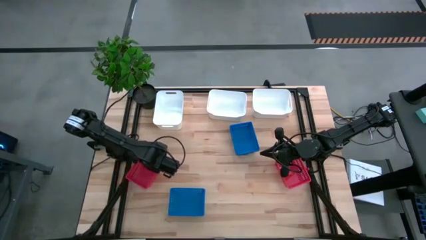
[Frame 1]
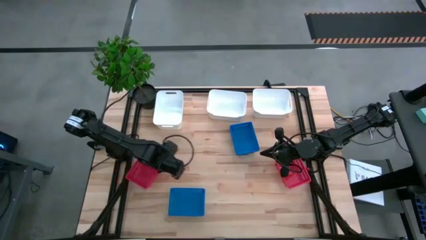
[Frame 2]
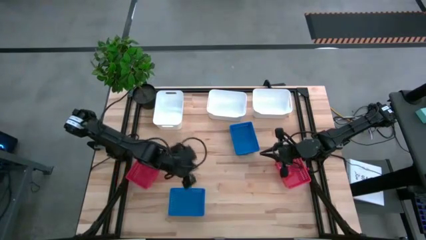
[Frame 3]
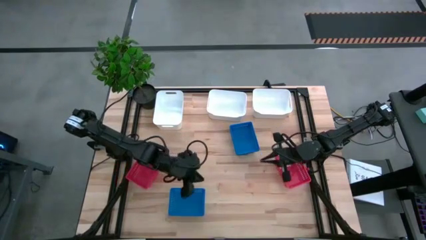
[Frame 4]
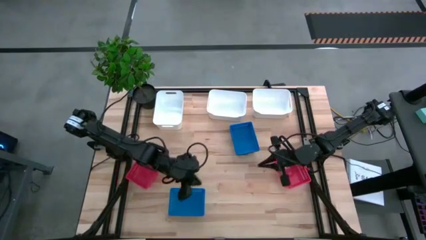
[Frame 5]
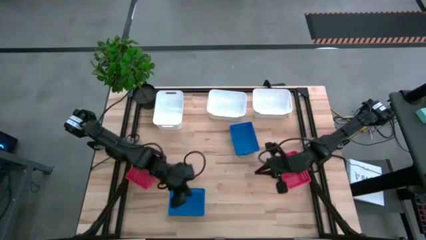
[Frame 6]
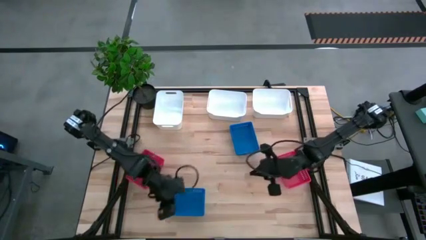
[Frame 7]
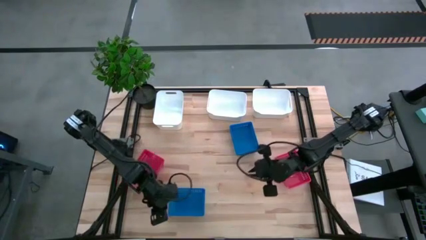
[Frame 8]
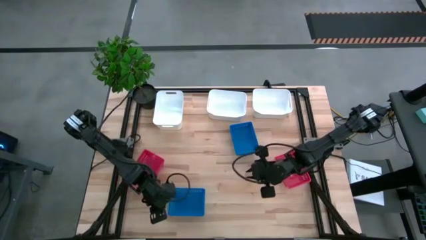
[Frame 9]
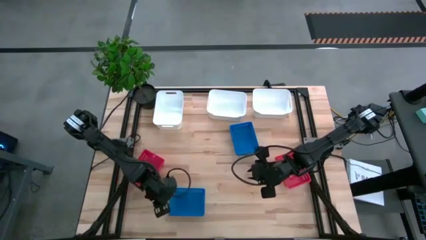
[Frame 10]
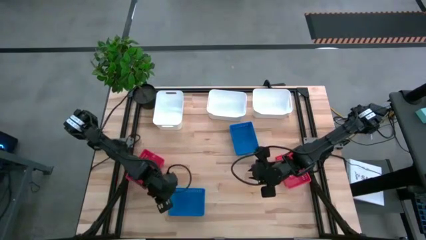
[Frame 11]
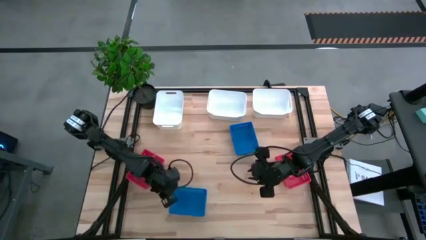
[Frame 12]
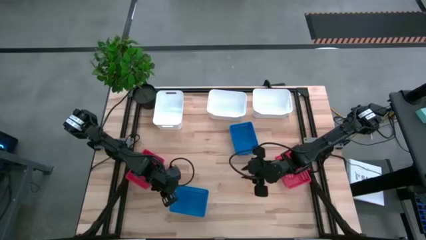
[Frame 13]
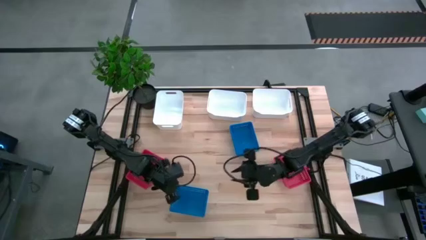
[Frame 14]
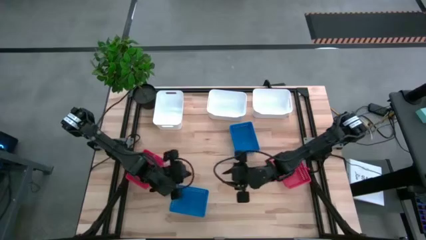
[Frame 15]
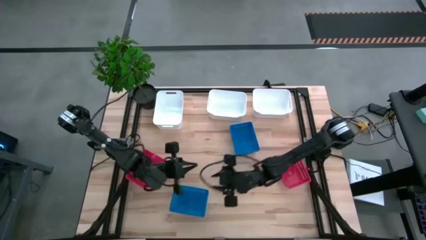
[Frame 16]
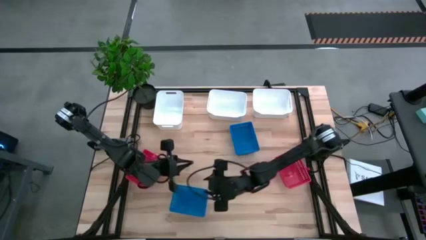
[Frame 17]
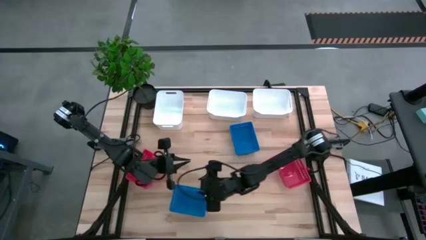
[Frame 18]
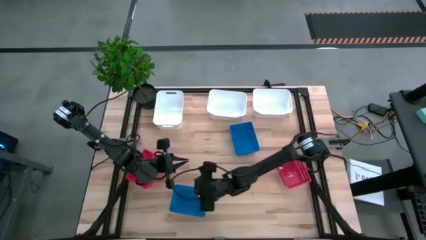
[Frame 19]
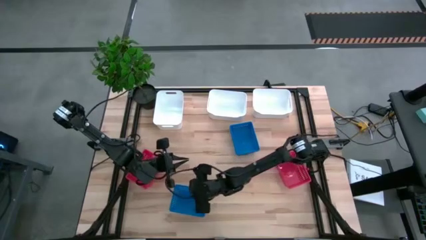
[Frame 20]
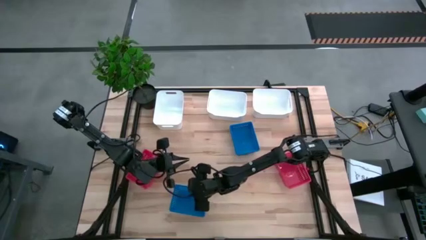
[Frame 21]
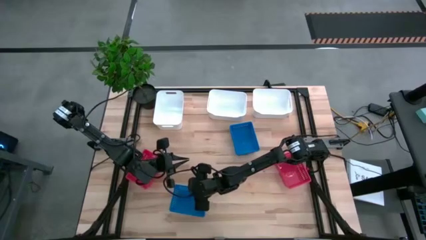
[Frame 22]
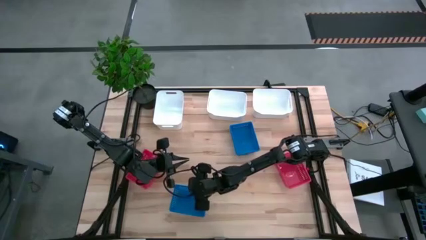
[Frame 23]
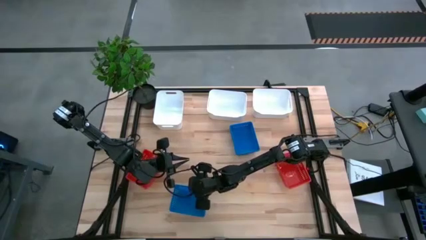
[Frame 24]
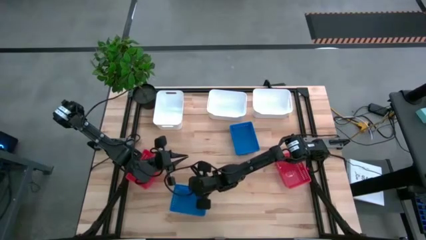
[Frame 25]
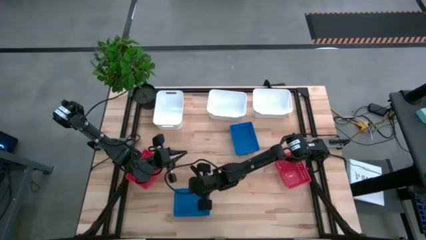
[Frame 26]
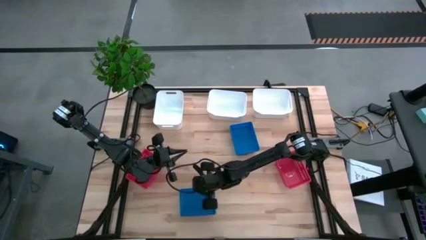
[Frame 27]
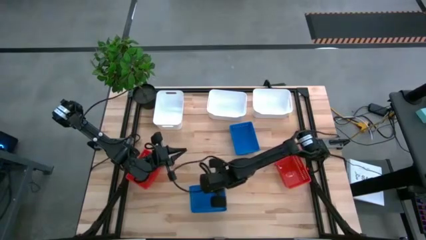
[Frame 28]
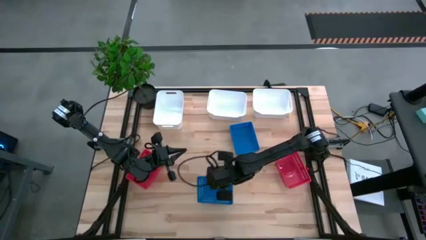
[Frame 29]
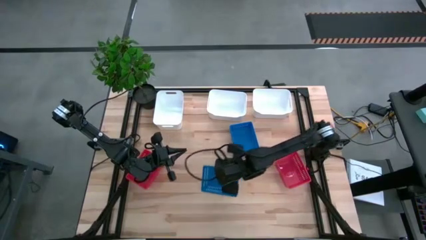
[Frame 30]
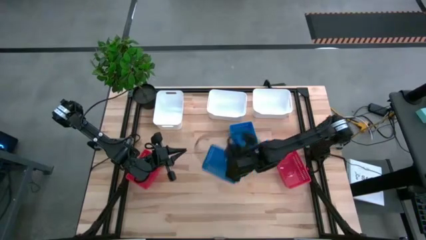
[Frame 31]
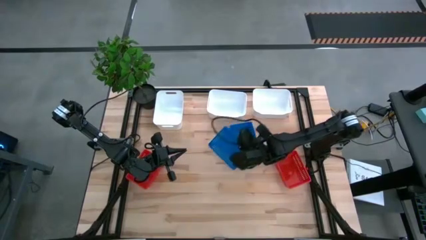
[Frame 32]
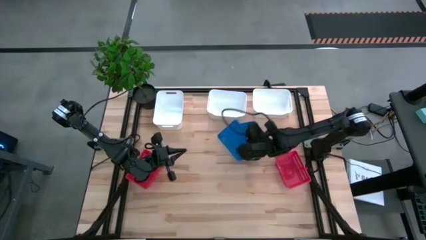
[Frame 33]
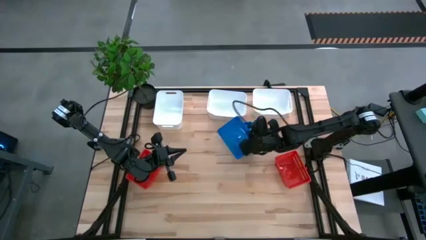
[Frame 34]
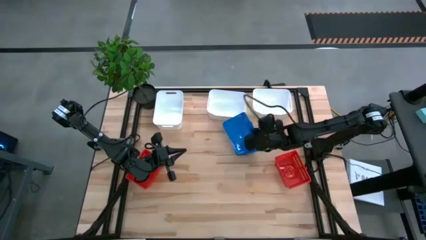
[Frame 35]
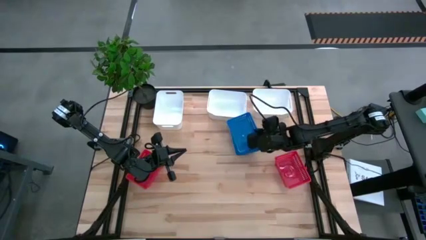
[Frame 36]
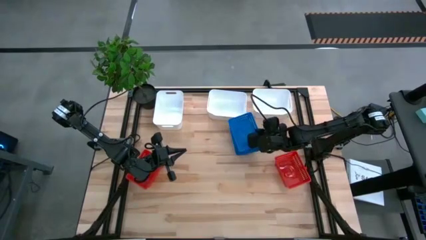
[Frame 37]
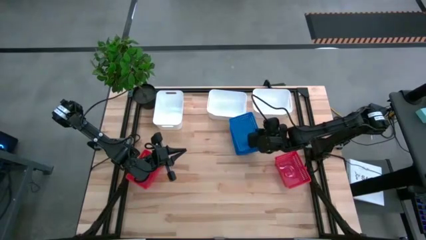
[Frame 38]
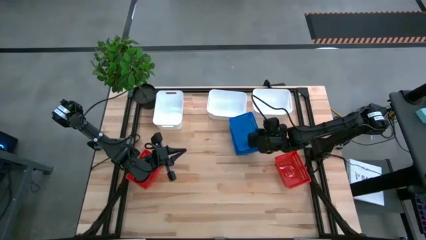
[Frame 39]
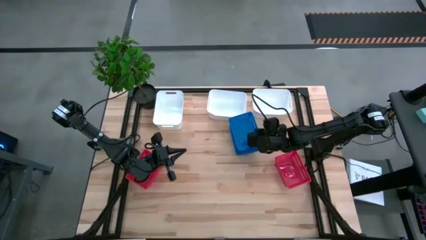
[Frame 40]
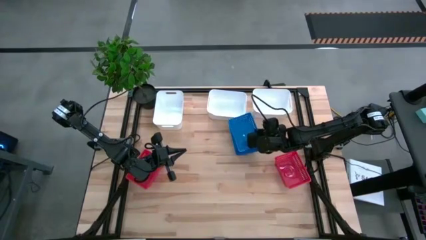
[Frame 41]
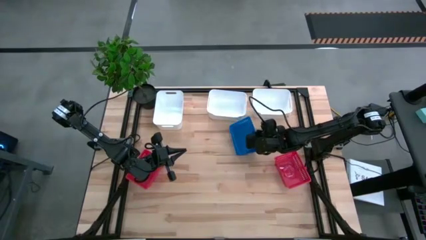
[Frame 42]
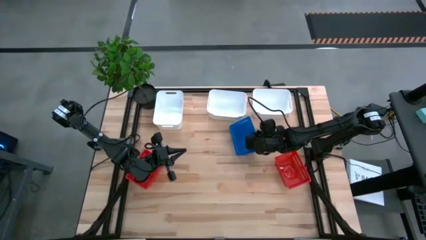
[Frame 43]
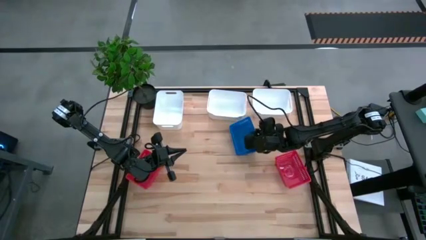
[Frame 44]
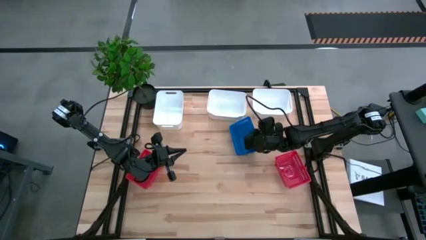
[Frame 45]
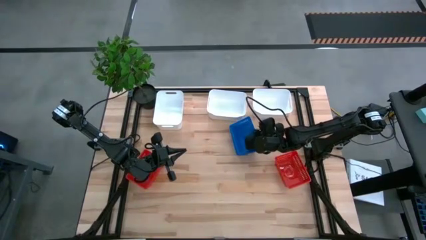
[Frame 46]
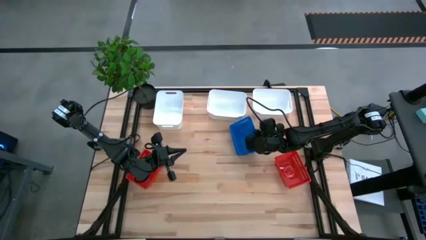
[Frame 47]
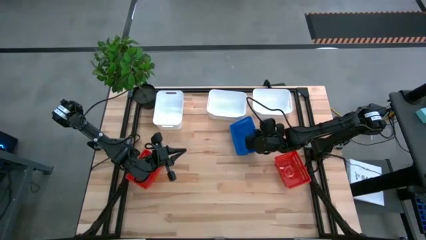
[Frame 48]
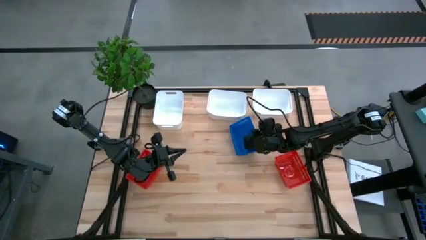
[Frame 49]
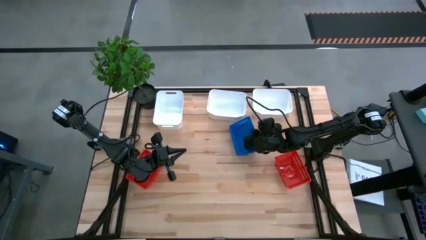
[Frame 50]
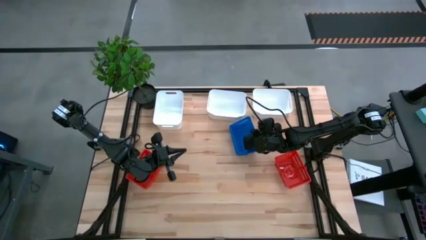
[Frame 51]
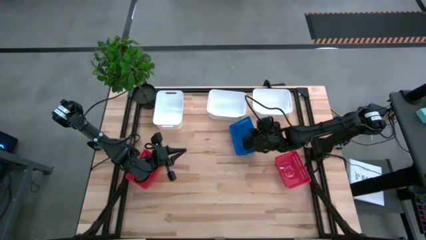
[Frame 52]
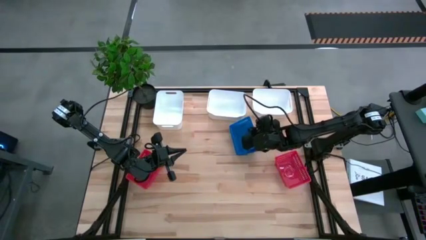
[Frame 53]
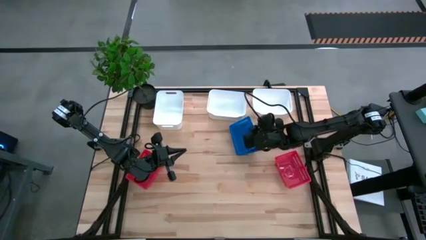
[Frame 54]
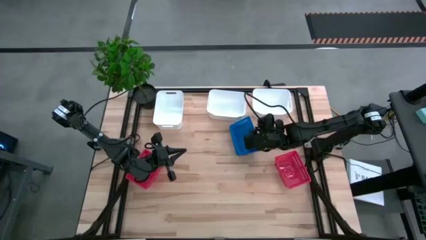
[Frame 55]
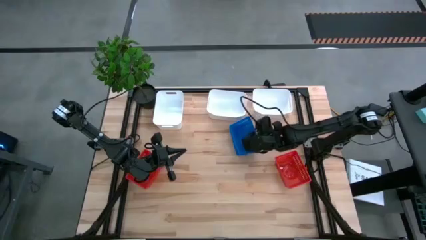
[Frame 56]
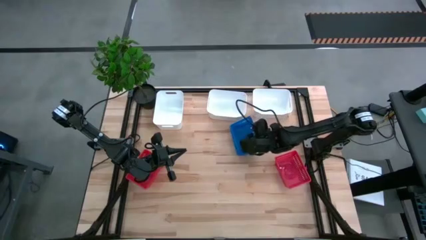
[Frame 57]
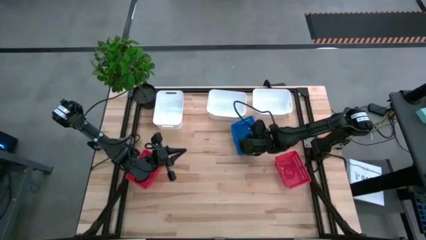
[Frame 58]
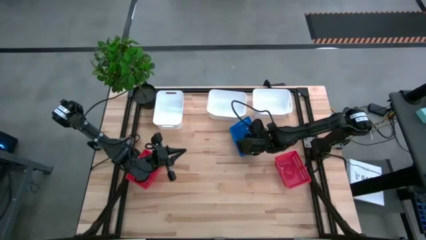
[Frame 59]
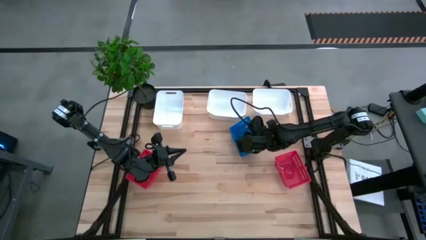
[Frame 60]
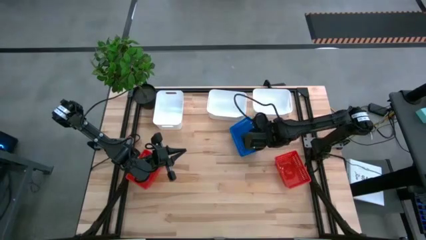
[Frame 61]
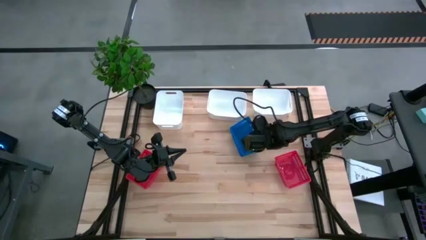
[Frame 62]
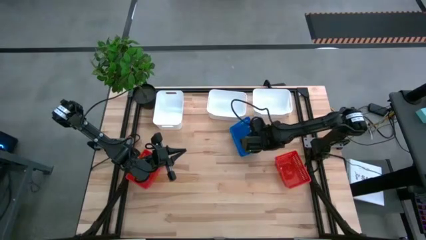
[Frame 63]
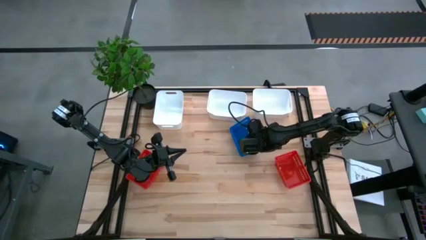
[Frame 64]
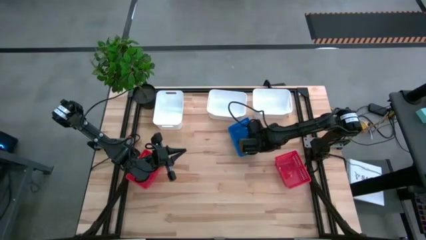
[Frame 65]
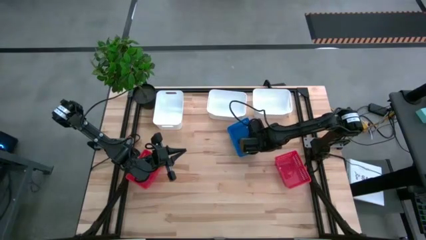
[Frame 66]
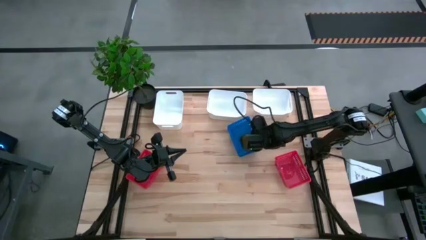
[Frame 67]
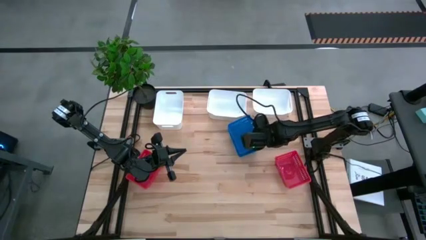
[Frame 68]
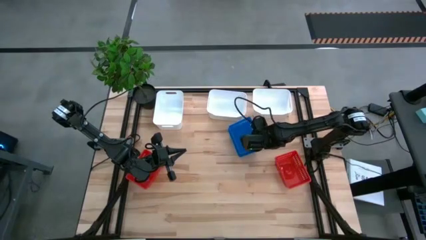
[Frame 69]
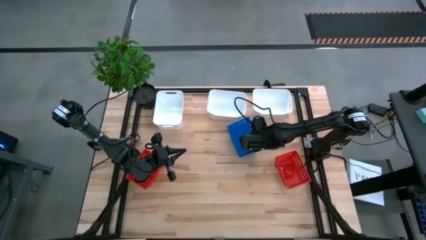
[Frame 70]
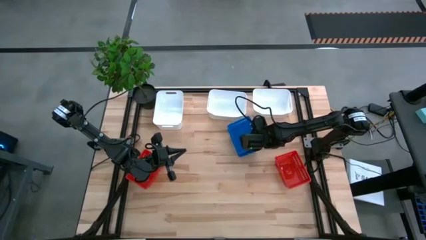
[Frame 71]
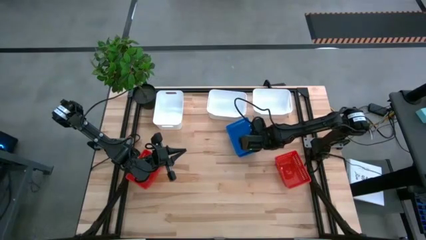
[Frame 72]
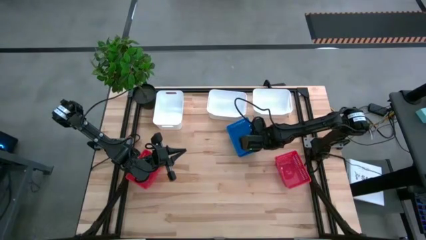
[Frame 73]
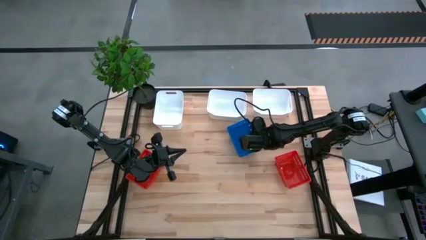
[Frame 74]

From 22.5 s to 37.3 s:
Stack the bottom blue bin on the stacked blue bin
